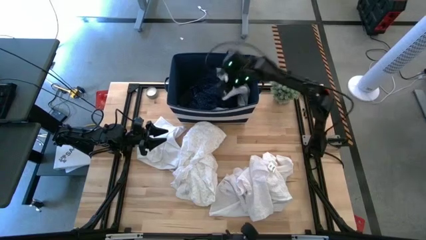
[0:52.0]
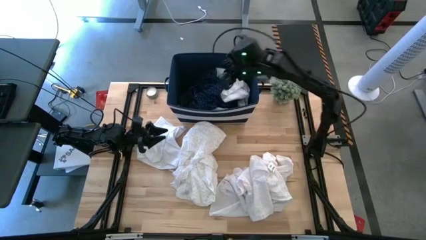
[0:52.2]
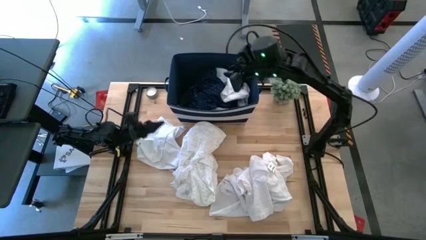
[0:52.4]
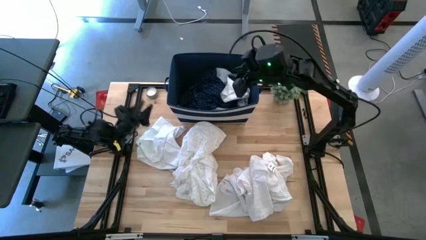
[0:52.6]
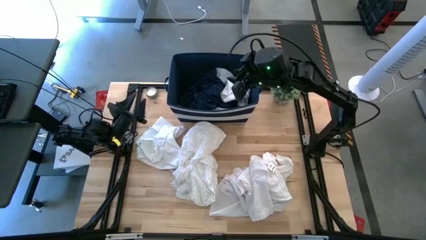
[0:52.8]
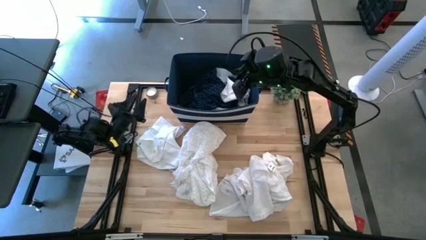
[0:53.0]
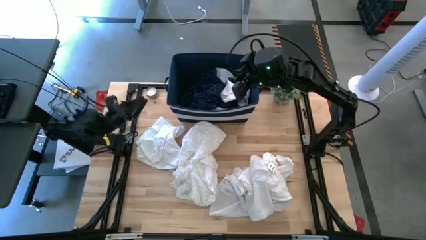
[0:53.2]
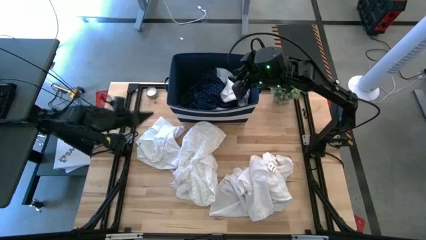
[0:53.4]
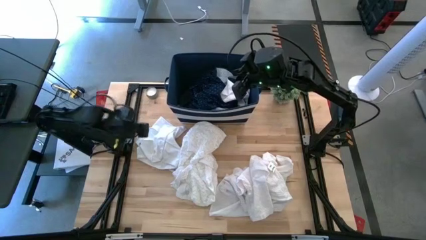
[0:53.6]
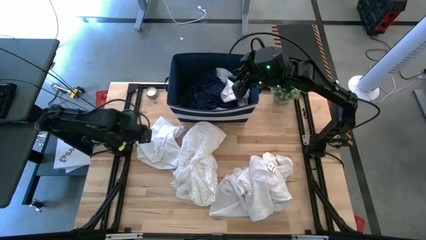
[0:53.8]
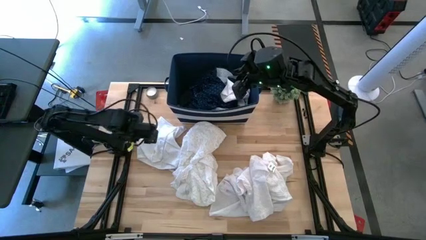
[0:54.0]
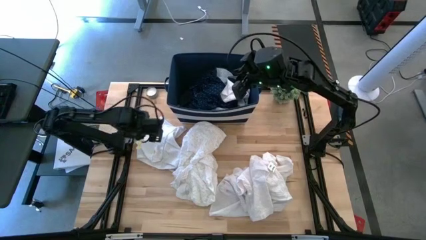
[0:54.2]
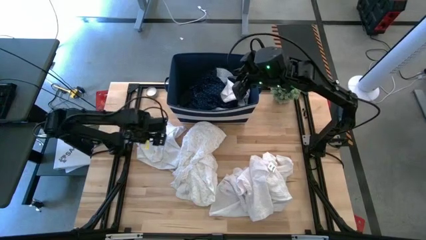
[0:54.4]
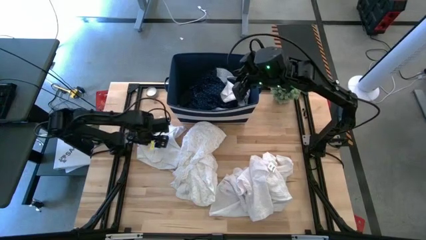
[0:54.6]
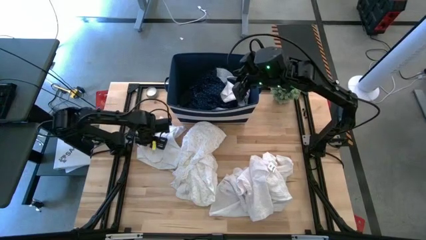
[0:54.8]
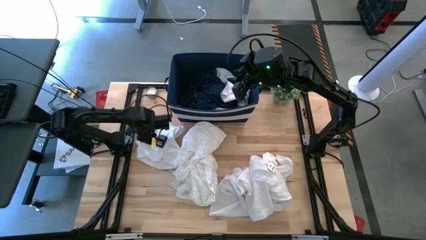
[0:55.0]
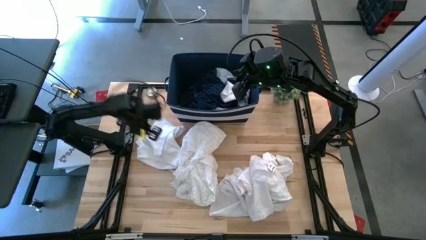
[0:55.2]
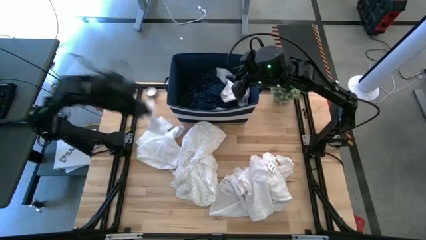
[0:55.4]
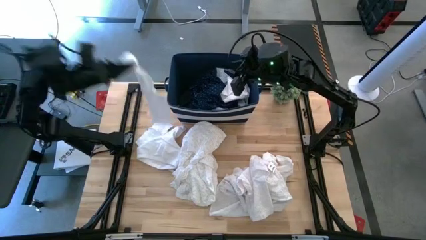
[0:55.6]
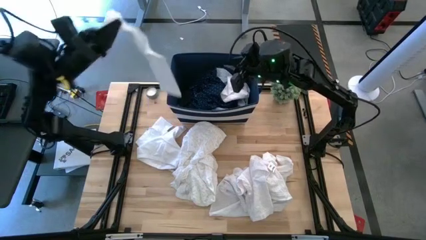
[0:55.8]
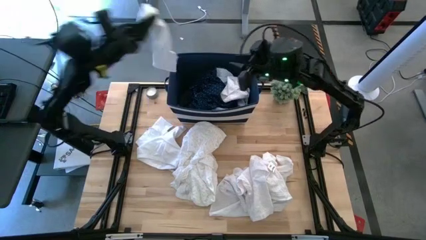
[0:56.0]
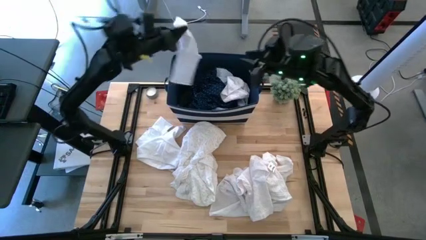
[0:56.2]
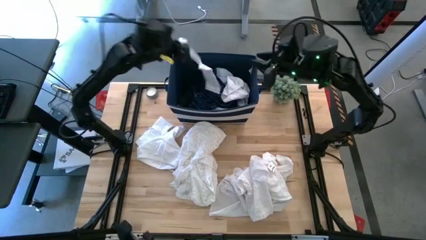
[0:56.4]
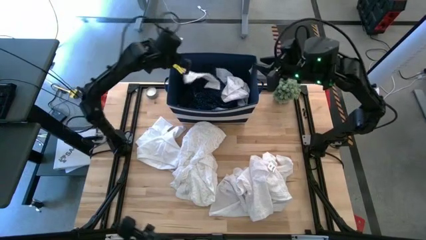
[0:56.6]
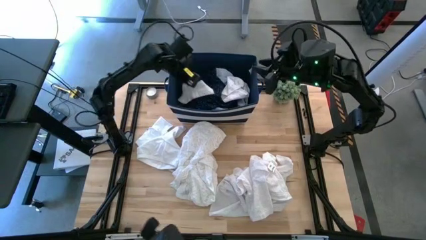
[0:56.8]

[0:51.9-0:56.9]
Task: Sort clothes
Put the white sock into the blue bin

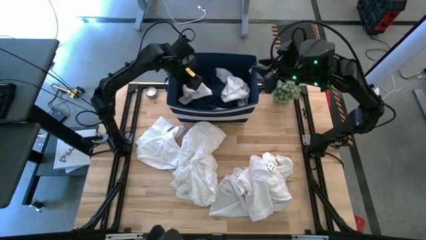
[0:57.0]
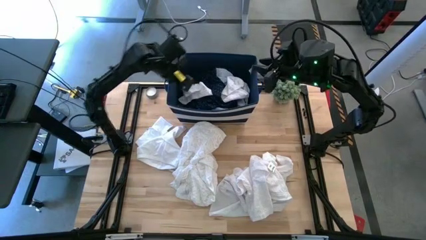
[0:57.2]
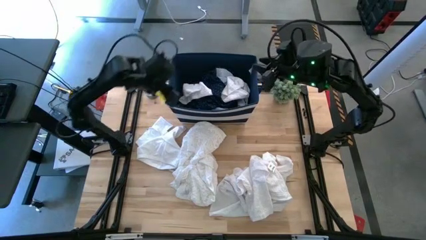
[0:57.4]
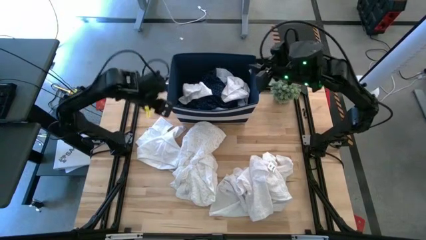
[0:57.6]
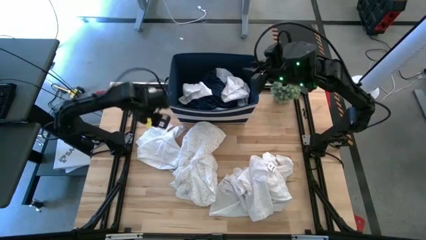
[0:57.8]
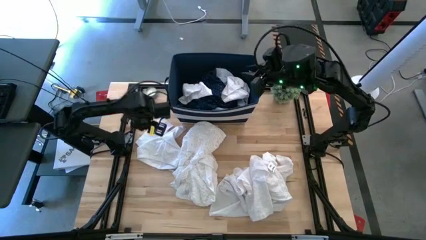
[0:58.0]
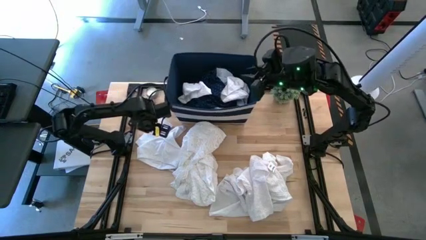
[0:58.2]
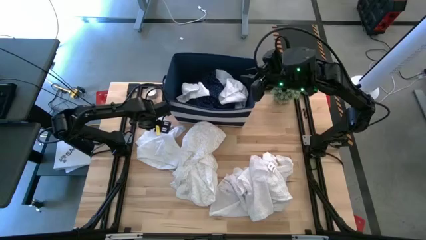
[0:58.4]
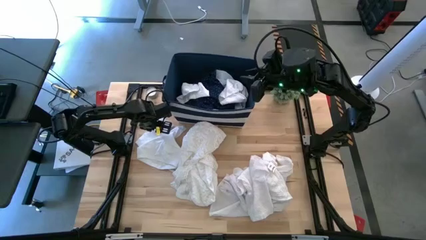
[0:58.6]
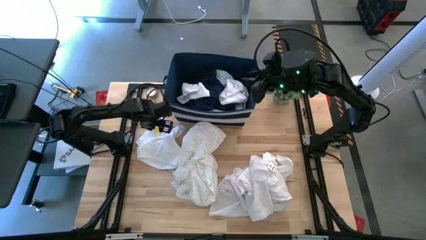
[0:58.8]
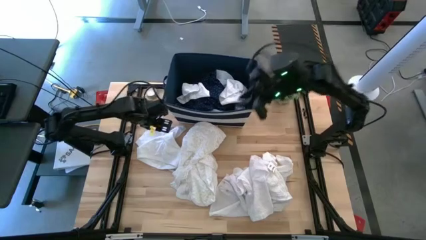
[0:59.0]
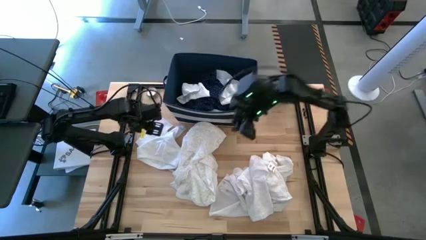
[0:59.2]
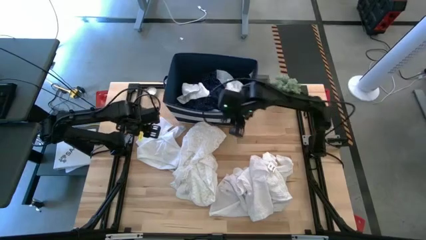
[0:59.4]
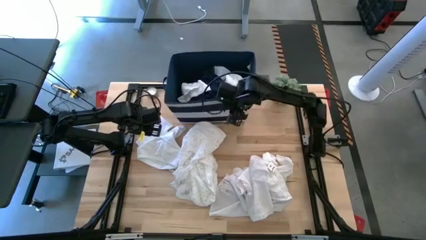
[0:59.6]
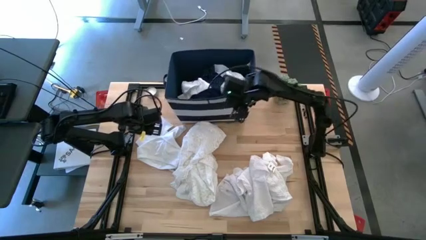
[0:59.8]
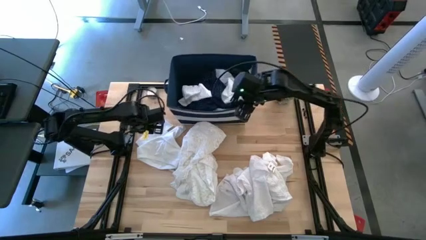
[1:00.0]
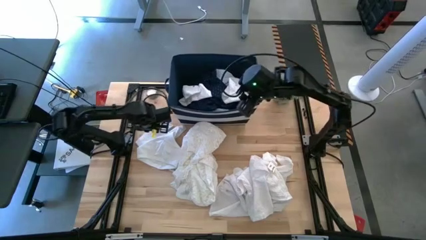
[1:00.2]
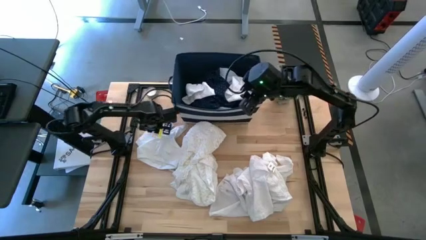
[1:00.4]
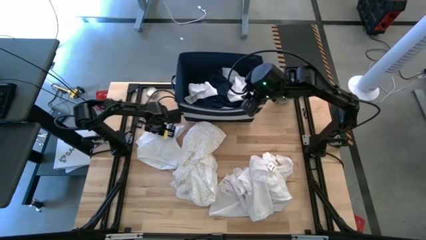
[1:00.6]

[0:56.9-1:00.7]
Adjust the blue laundry bin

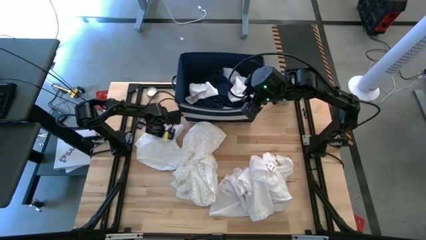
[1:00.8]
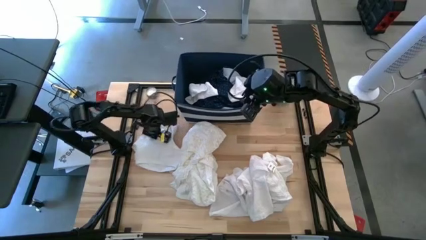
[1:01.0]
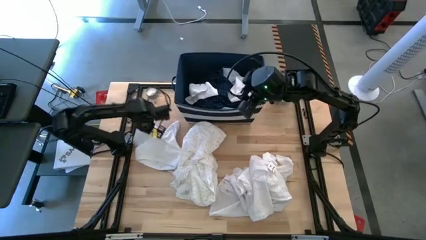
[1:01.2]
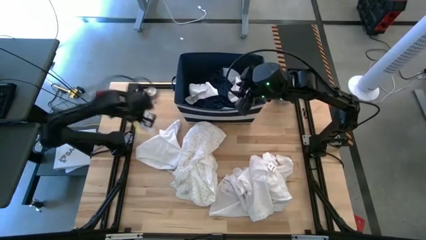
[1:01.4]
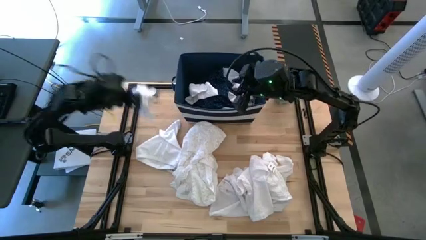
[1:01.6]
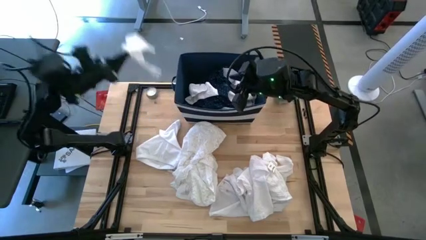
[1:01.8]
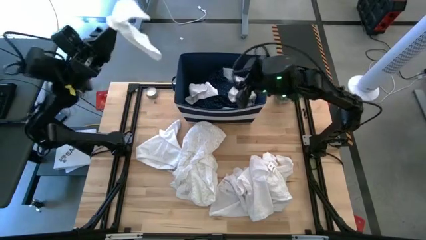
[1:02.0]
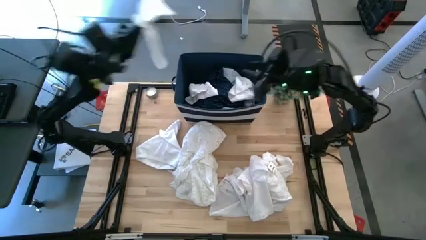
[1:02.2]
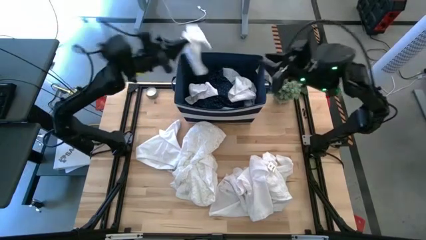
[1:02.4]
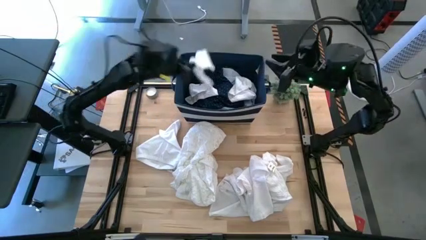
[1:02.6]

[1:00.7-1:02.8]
Put the white sock into the blue bin

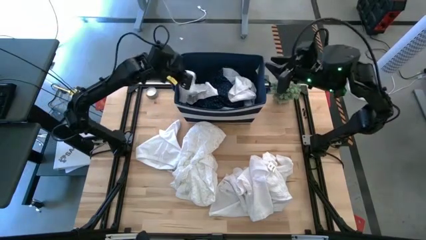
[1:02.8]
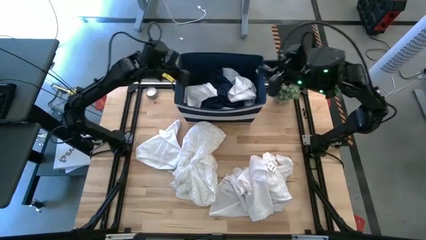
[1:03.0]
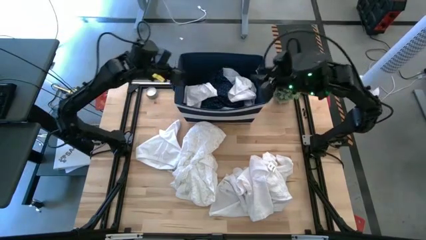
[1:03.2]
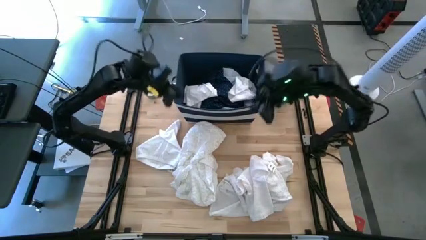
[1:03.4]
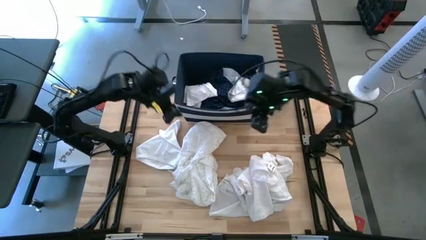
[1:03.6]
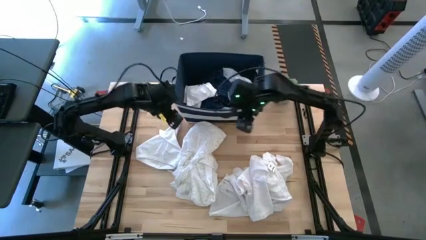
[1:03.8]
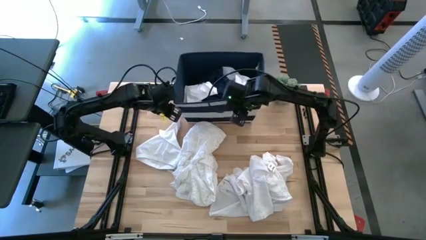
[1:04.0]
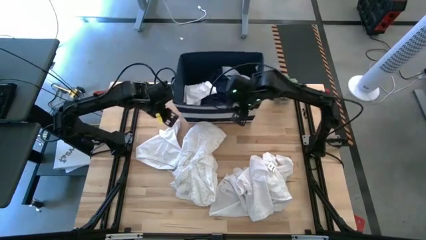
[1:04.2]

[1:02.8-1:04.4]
Adjust the blue laundry bin

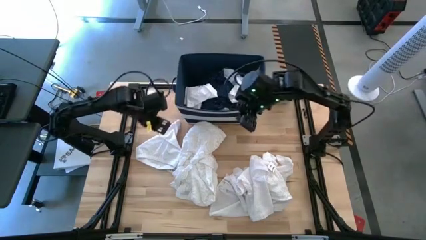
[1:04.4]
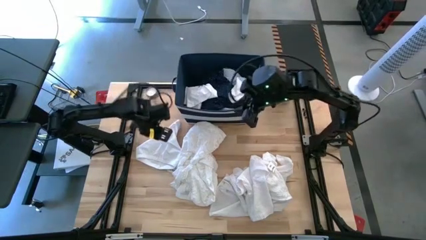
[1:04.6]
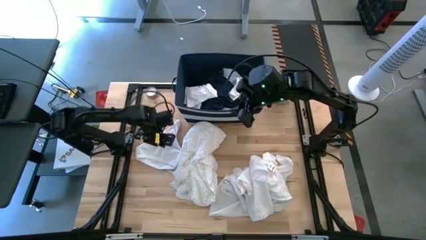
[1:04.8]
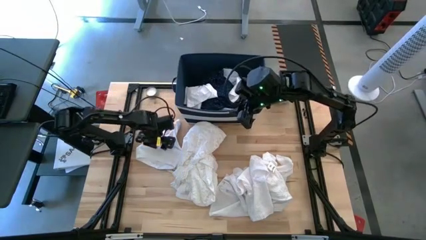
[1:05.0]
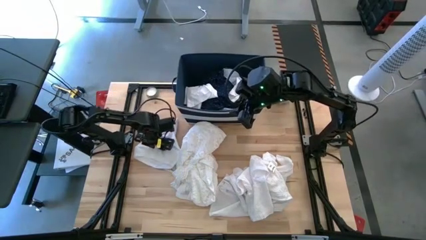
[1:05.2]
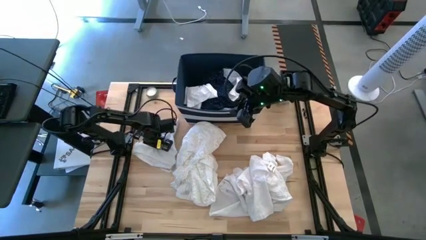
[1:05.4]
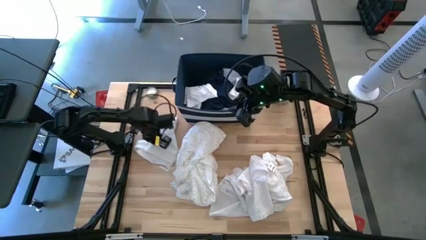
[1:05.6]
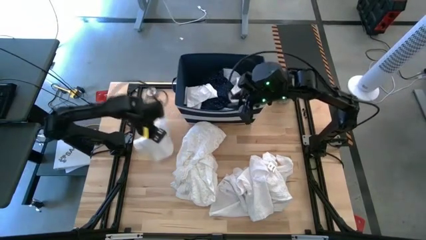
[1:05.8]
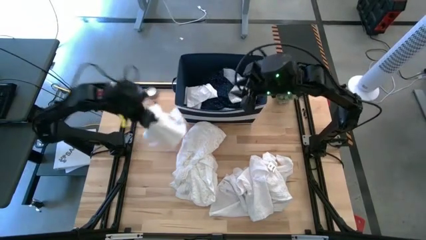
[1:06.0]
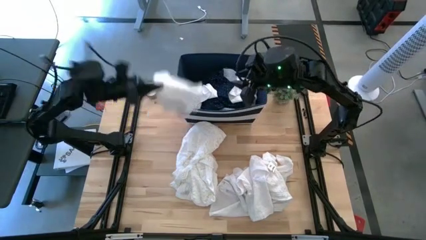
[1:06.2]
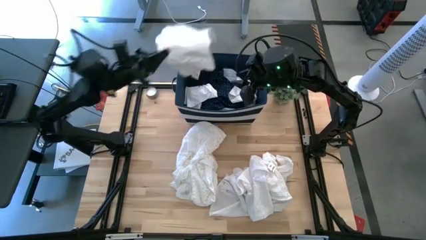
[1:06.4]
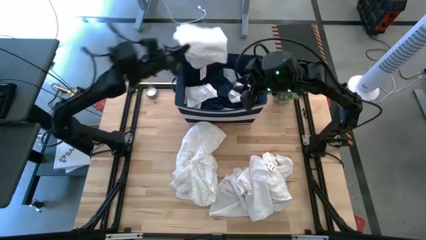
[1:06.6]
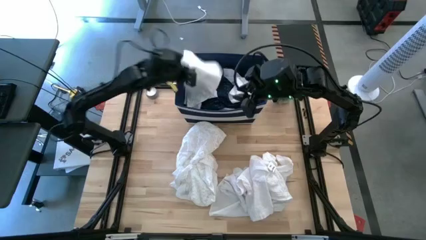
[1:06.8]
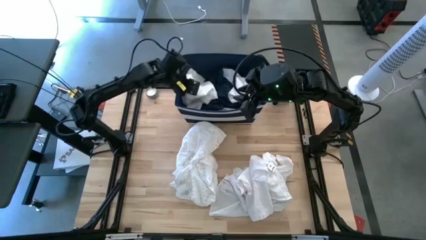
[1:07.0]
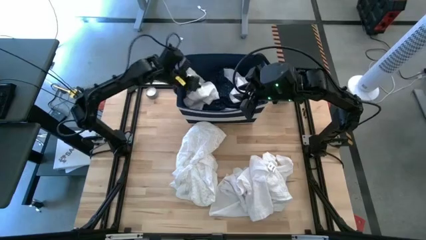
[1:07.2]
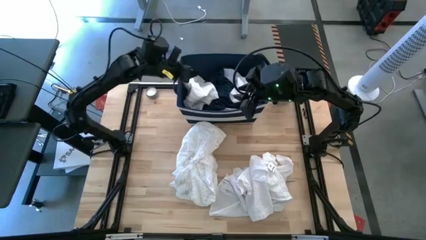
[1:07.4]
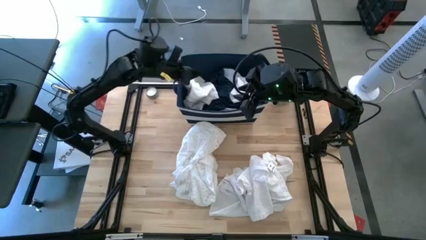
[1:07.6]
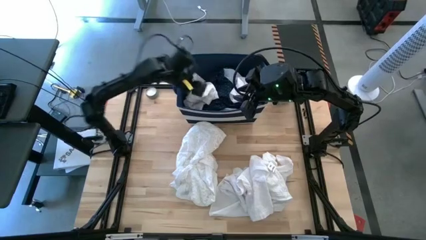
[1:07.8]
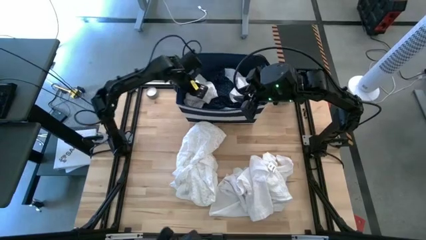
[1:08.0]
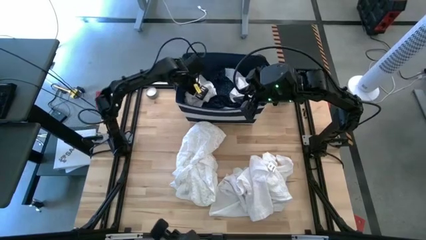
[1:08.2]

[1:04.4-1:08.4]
Put the white underwear into the blue bin

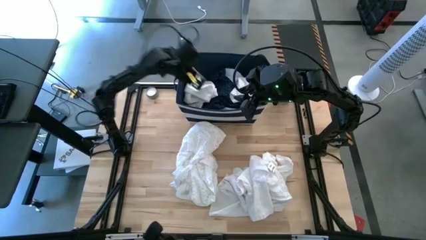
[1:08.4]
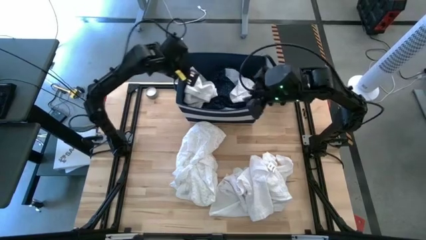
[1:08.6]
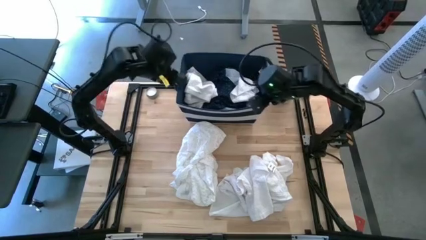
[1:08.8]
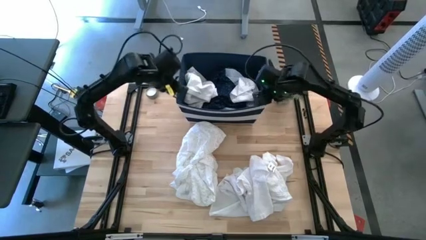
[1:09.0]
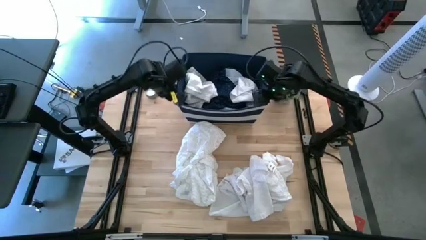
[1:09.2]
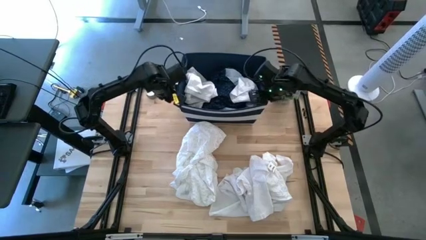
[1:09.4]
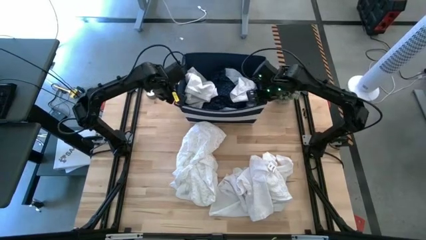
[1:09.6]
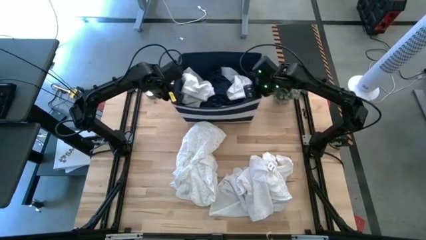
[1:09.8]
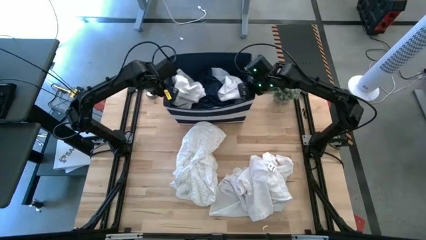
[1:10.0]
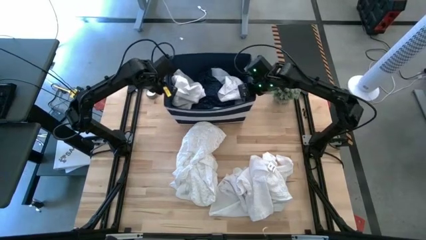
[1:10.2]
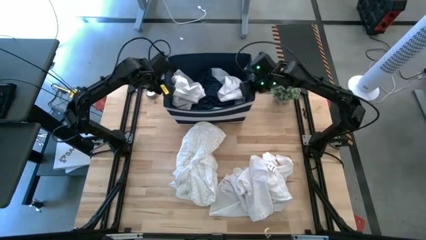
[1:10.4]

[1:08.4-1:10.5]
Adjust the blue laundry bin
